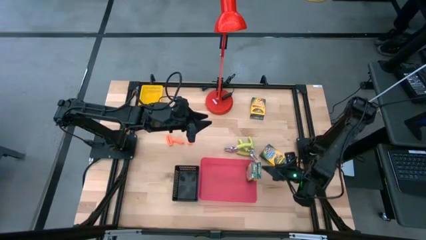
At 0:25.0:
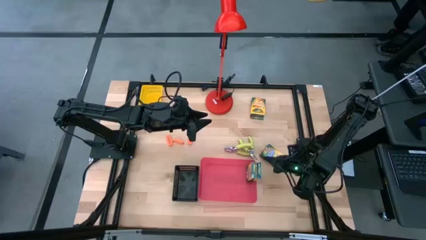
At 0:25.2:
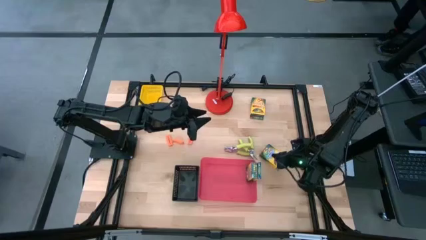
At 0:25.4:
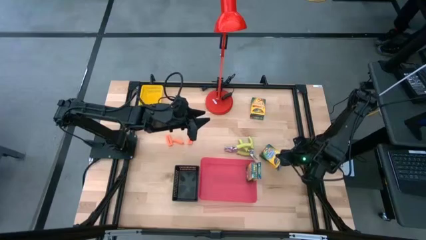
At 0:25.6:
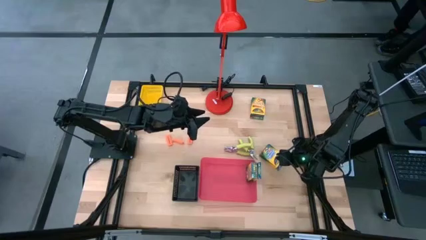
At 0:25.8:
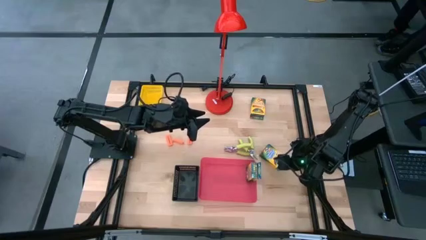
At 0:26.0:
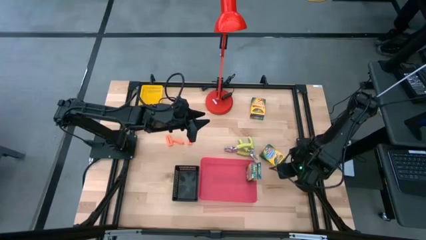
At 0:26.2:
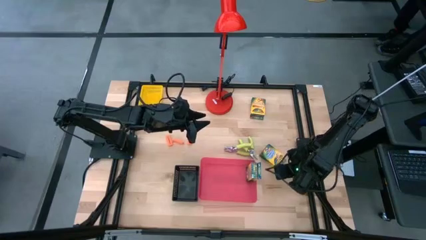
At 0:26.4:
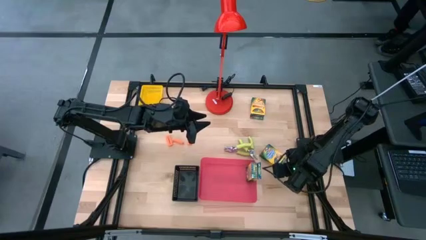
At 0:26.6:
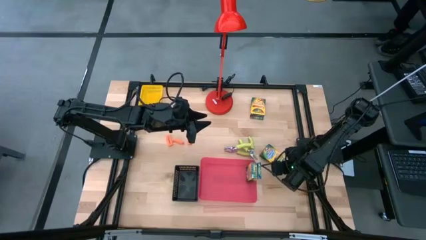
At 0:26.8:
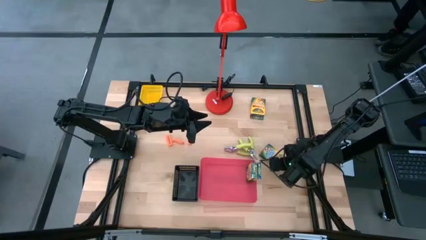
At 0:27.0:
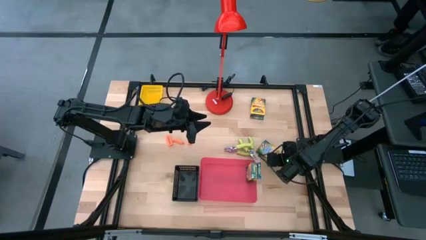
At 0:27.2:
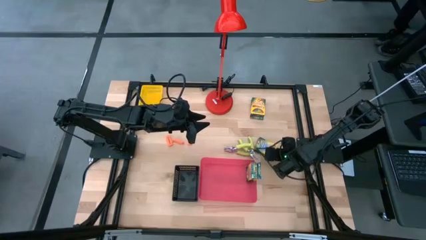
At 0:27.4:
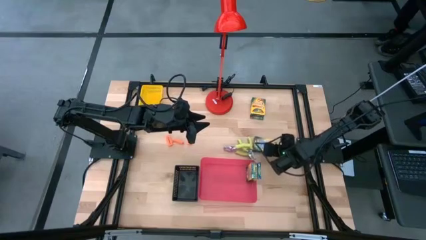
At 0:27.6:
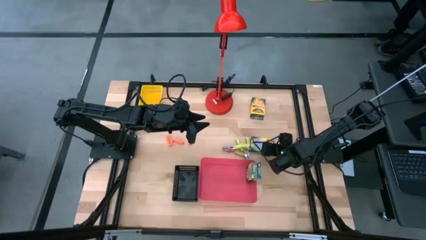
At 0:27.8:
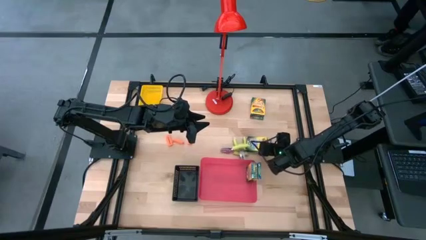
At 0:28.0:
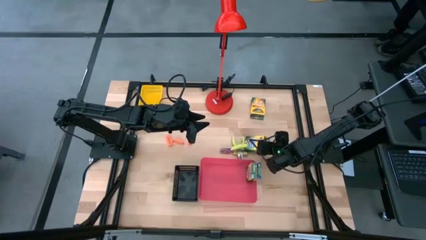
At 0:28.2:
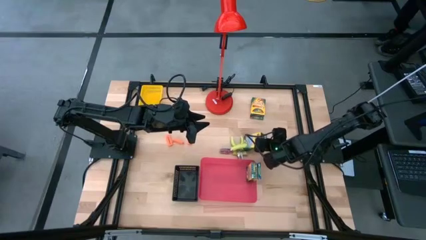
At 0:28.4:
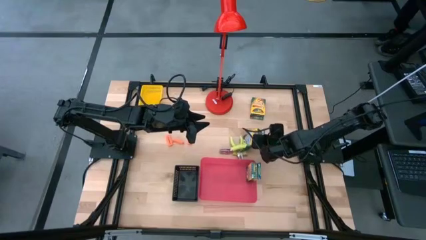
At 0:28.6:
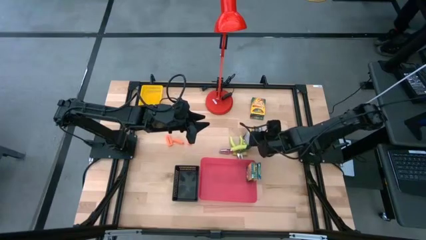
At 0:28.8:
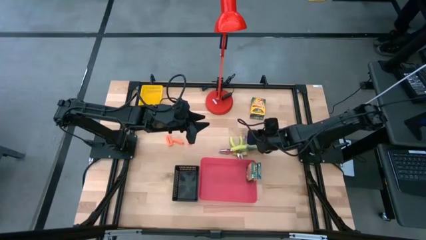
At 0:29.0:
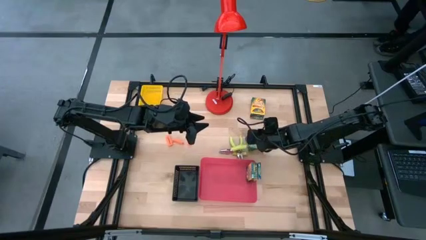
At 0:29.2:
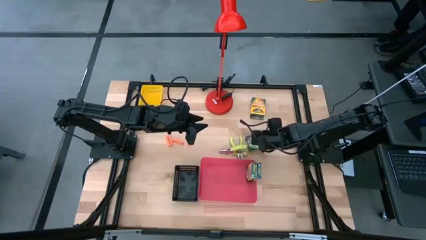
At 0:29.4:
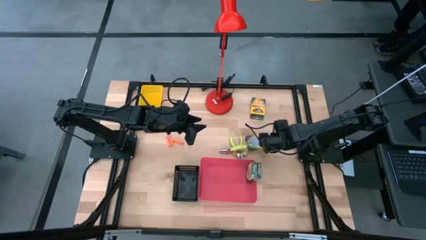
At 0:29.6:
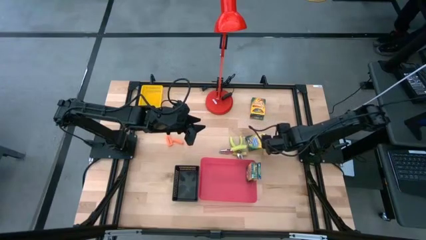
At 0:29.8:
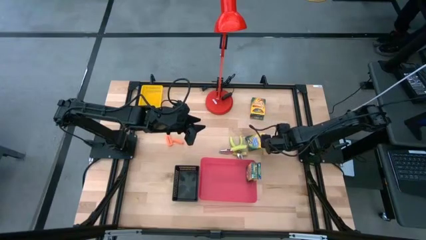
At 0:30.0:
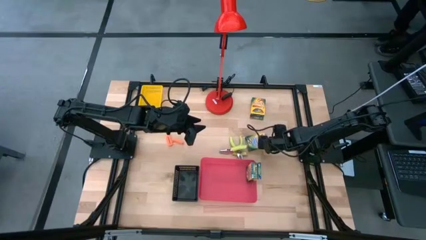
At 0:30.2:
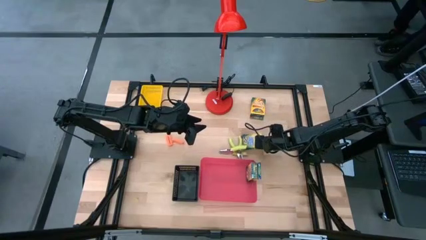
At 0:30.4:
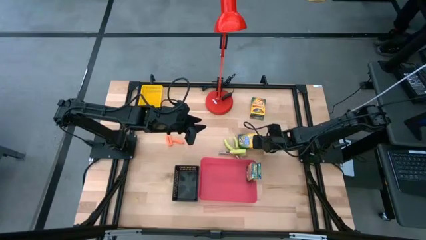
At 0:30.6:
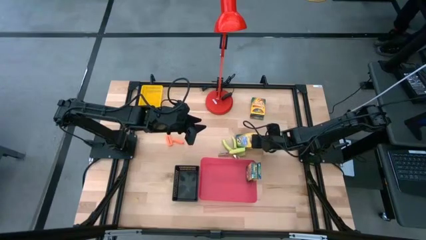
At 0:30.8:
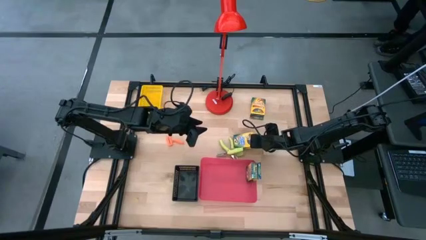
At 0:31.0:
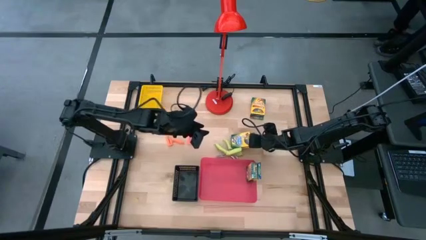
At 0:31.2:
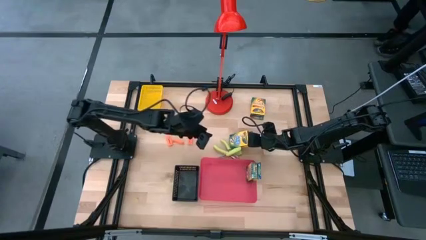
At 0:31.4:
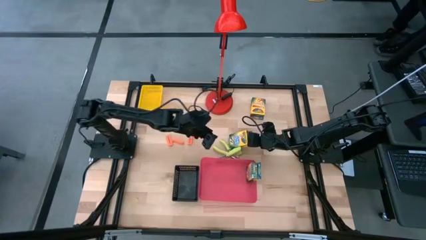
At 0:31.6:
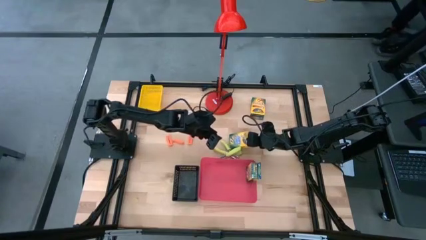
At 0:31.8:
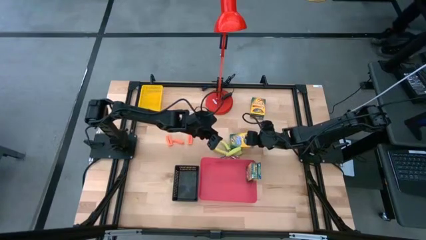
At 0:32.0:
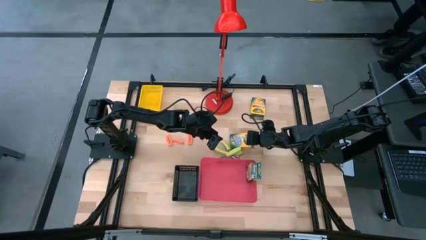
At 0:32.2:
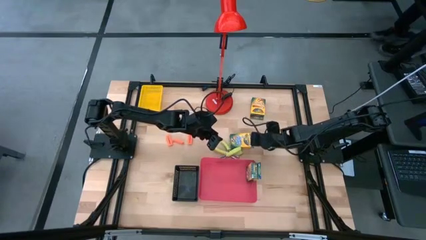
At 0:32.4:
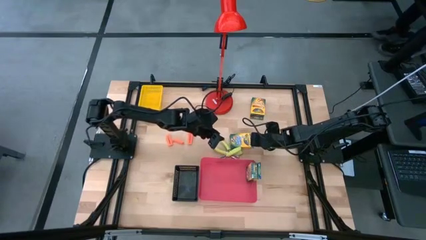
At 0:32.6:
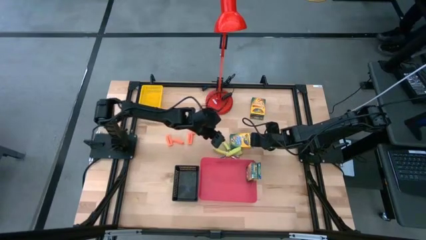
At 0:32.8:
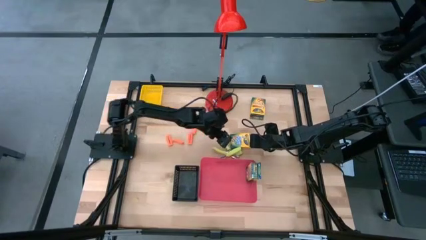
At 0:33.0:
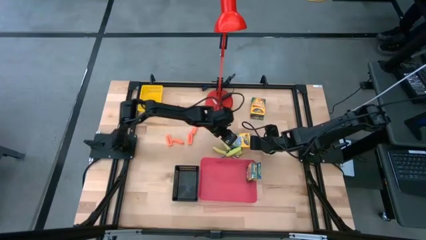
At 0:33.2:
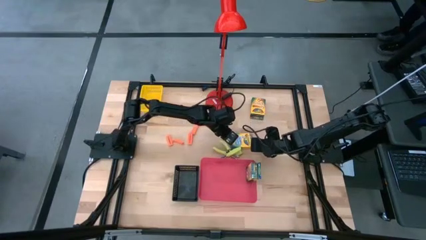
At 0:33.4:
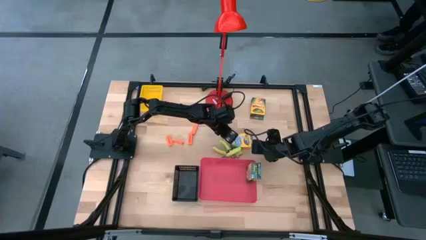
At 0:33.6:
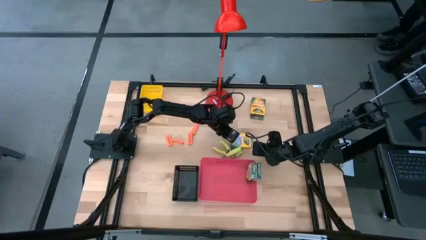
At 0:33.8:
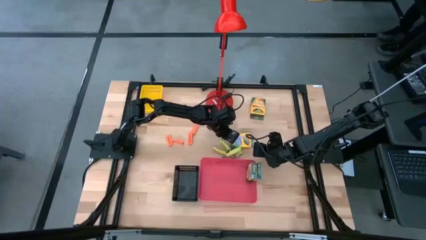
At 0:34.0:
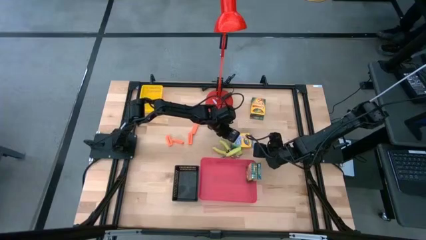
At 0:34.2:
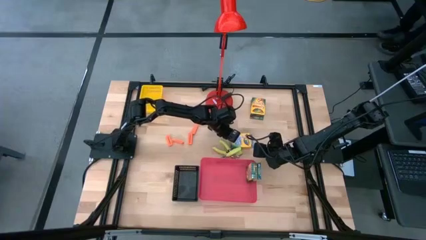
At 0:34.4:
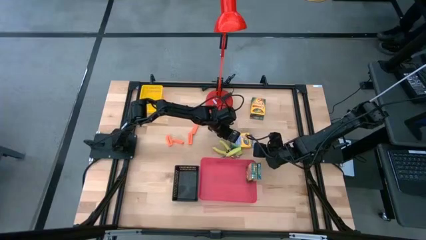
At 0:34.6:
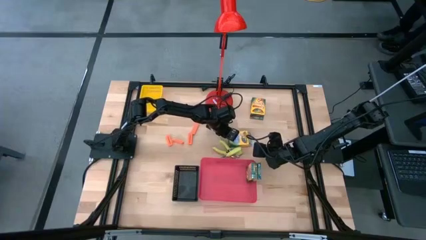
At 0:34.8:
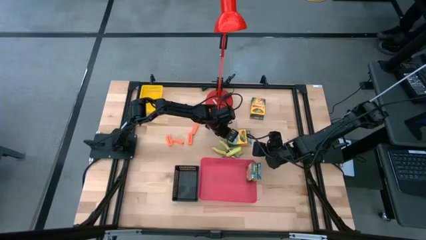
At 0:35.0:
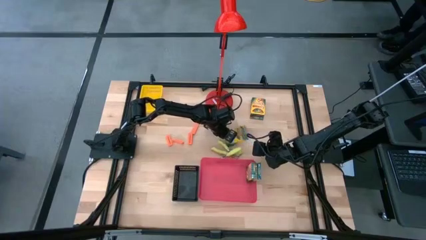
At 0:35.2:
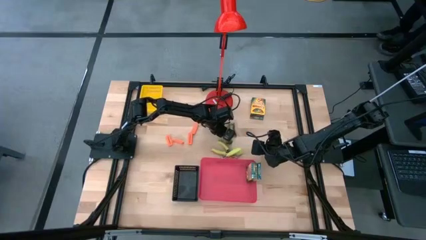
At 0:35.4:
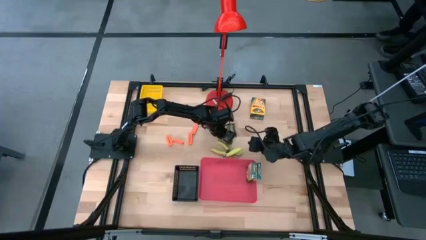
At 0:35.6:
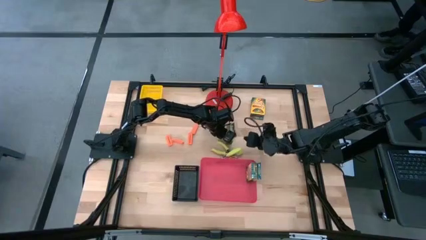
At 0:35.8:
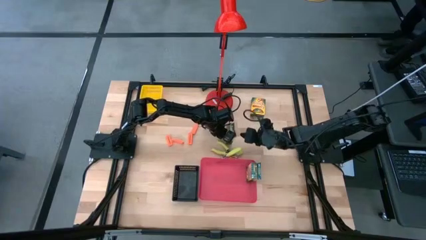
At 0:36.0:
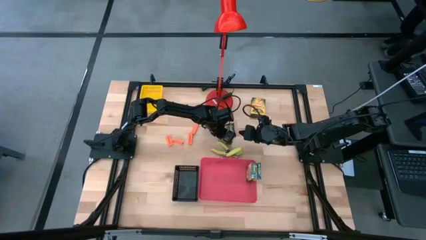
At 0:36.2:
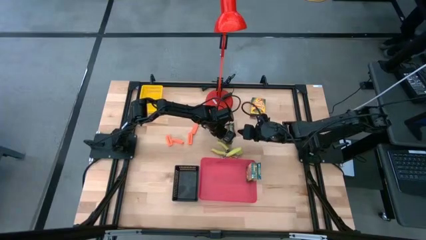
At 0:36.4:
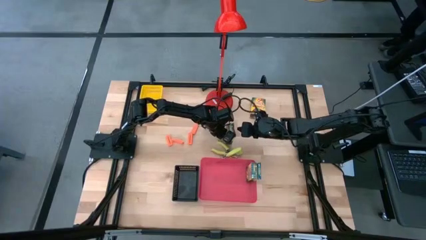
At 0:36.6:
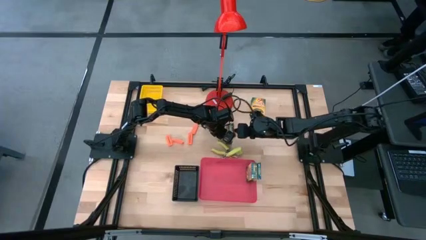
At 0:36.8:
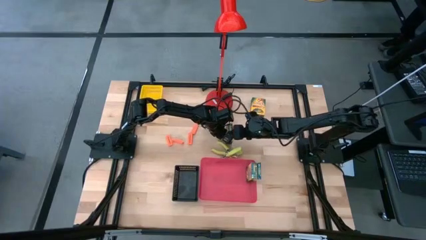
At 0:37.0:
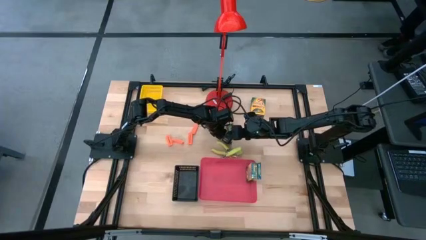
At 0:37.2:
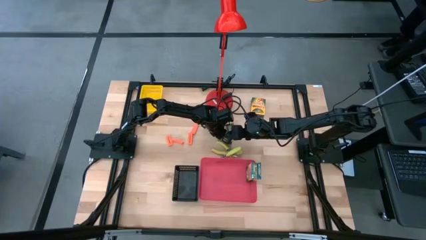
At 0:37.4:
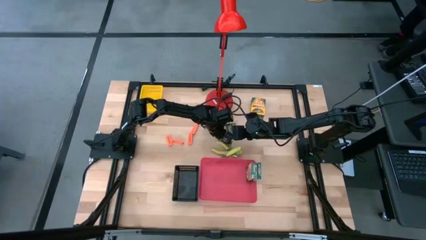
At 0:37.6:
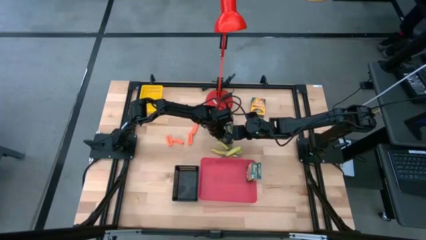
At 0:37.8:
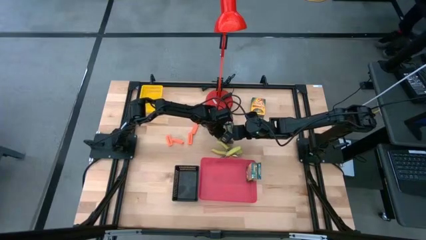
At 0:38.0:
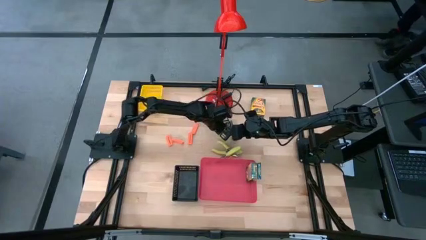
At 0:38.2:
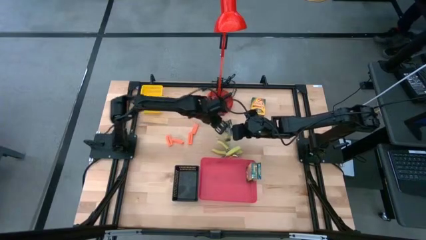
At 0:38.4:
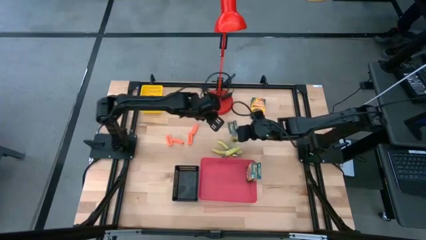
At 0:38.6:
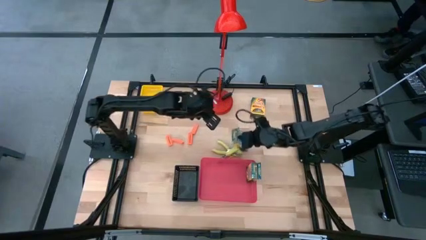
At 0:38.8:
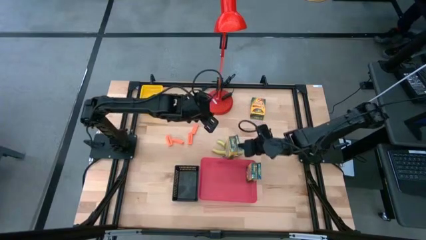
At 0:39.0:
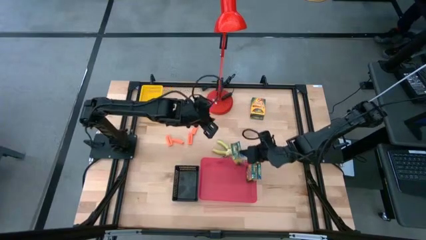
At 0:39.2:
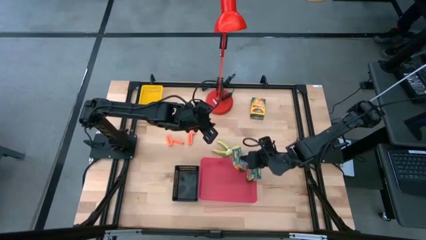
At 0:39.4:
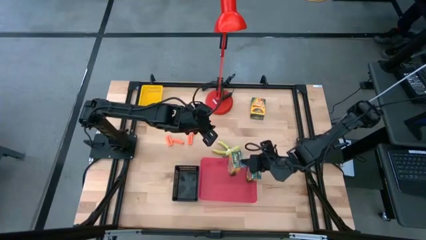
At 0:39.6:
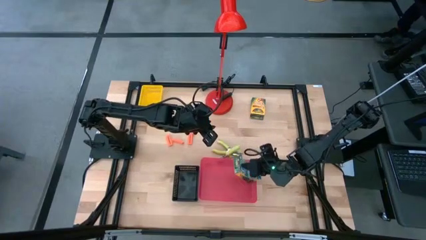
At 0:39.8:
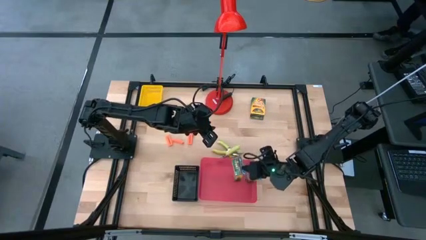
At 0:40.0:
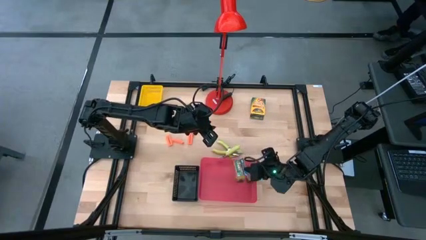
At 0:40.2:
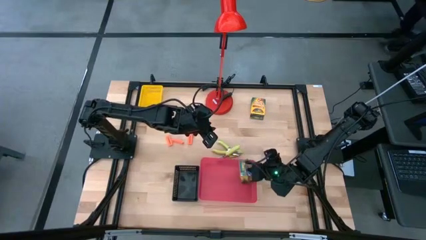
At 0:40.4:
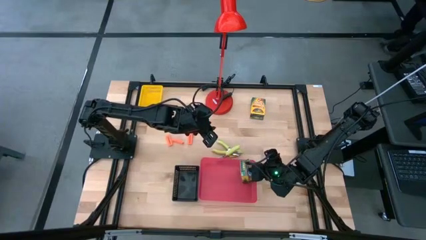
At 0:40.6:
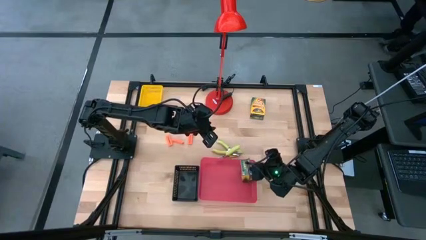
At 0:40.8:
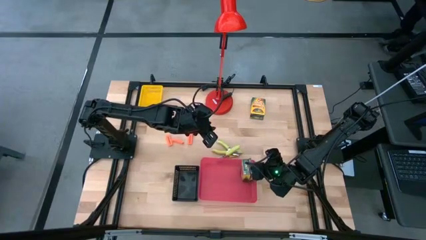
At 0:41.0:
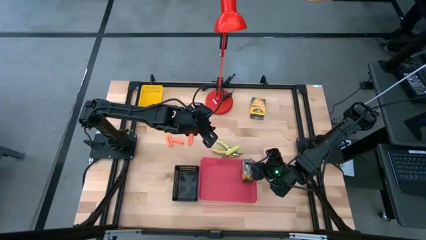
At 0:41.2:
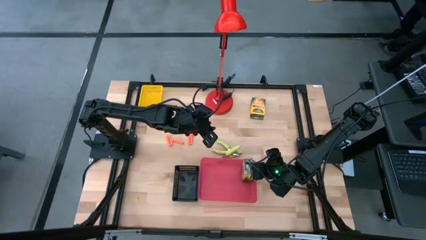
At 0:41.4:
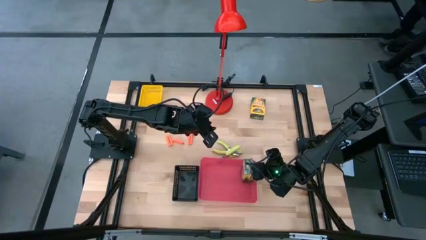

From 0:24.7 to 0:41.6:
Task: Pick & Place School Supplies
Put the bottom yellow crayon box into the red bin
